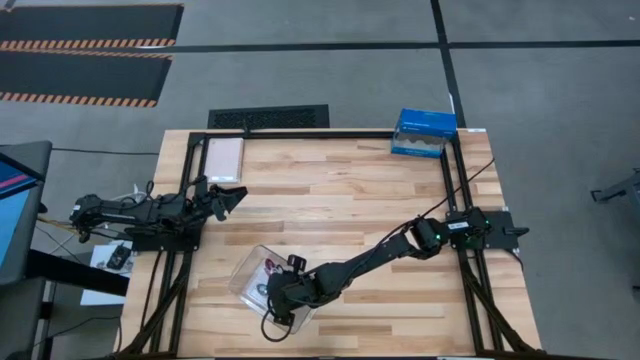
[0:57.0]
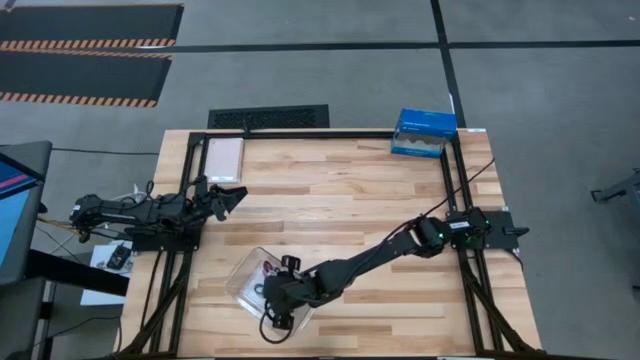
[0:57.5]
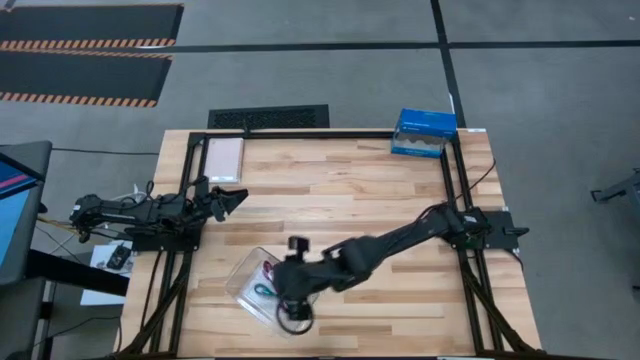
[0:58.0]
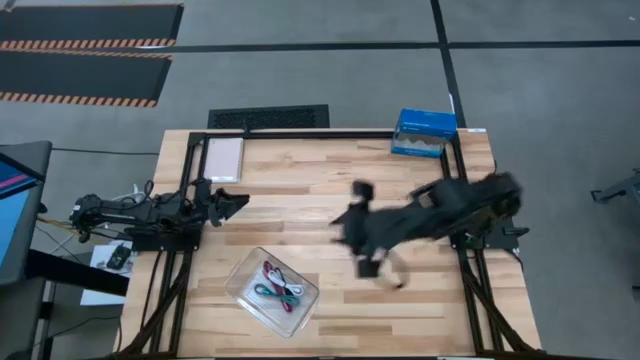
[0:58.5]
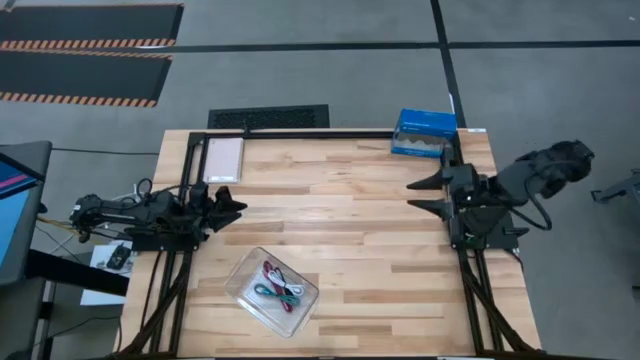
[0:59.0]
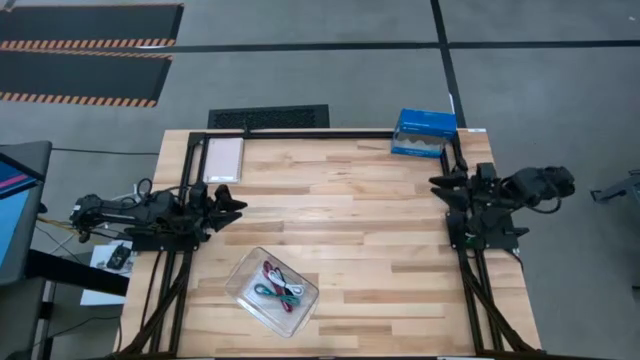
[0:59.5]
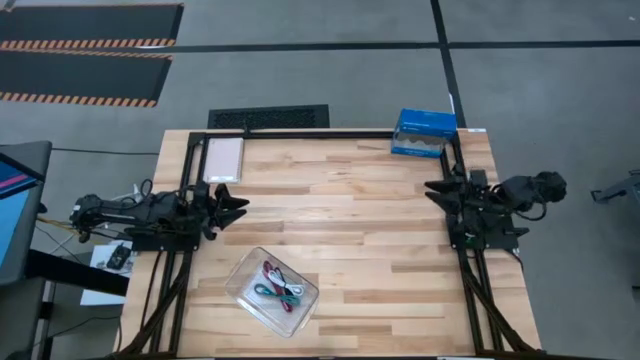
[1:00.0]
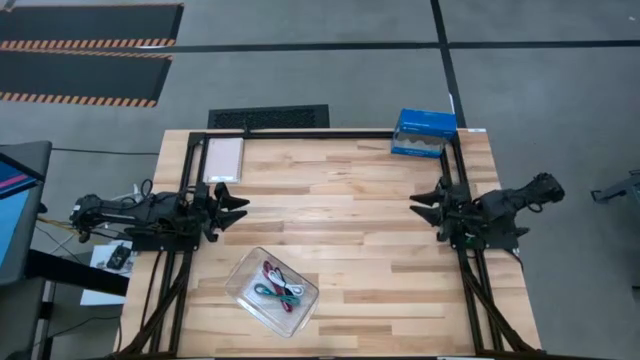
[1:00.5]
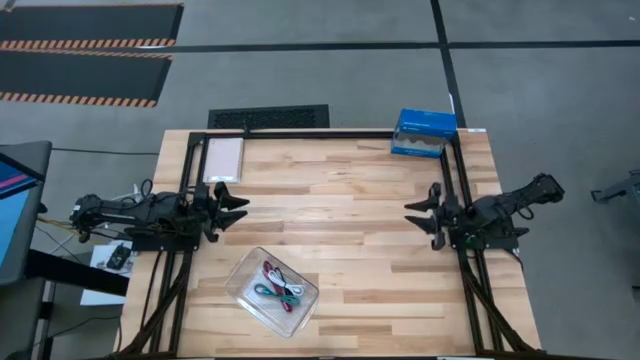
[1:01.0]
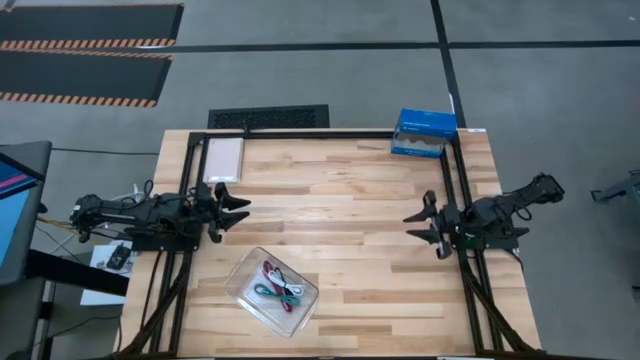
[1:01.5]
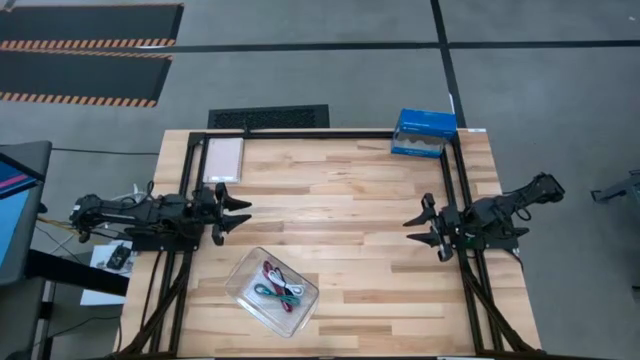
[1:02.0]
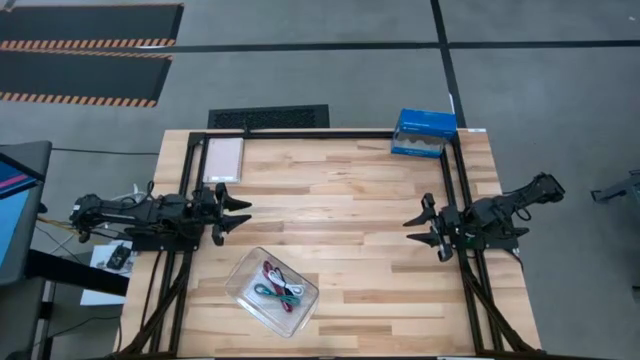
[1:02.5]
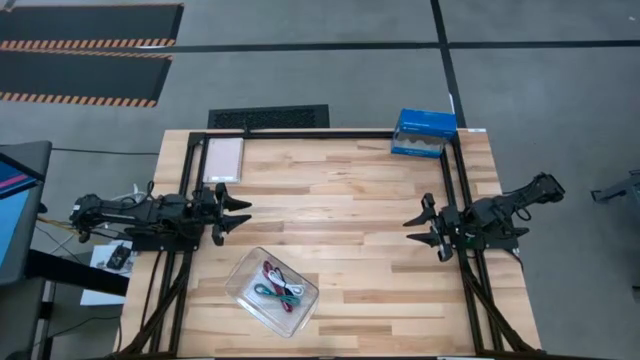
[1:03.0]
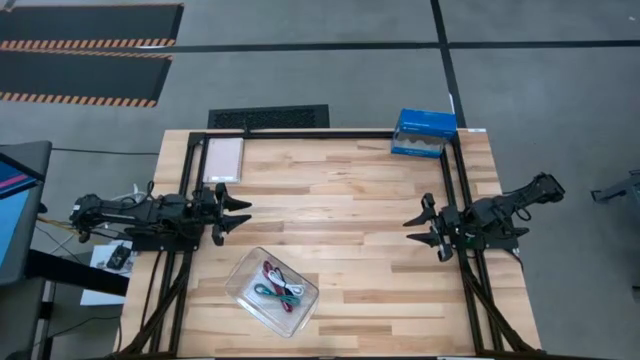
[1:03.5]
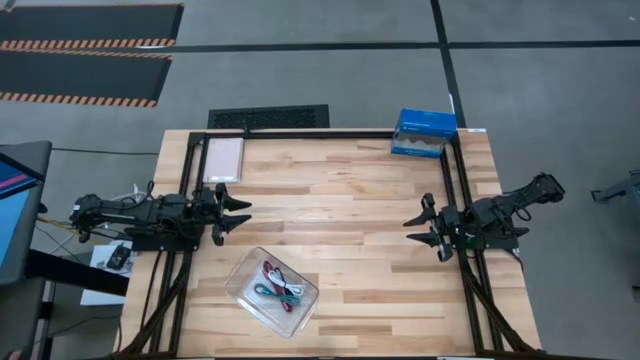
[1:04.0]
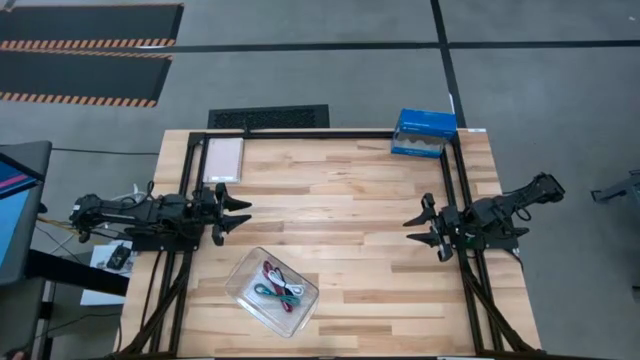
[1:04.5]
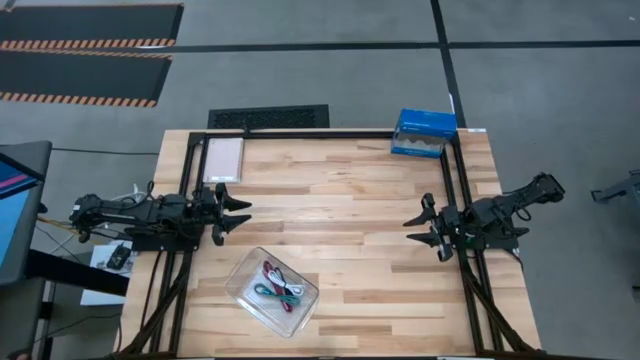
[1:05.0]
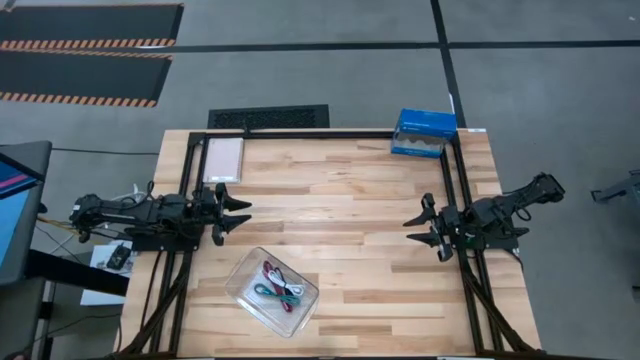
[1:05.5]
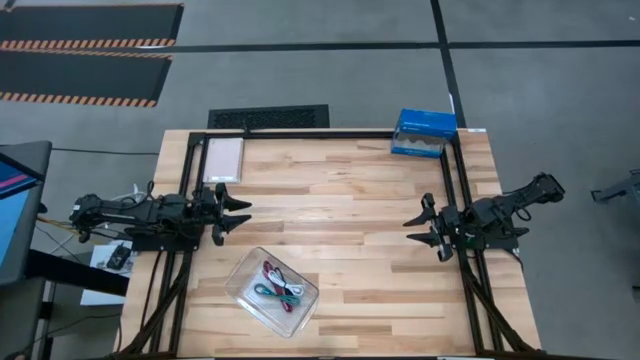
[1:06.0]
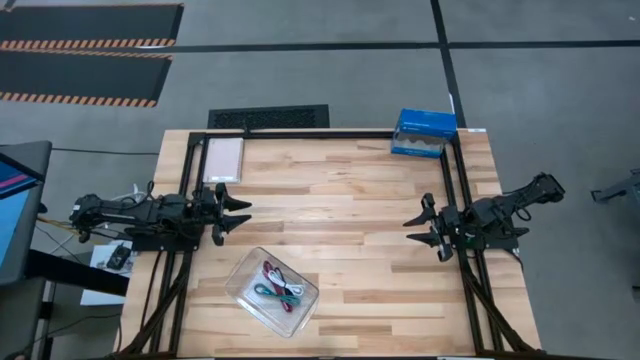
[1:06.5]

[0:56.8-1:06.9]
Task: Pick and place USB-C Cables
Return to Home Position

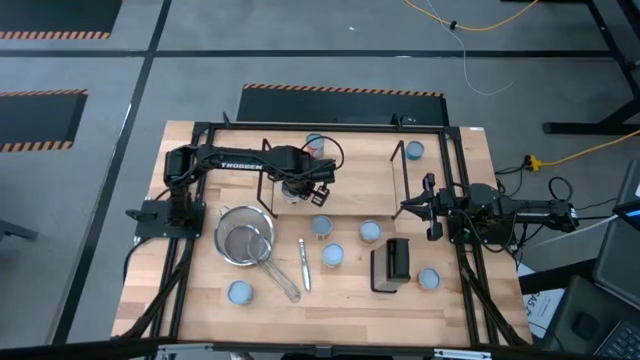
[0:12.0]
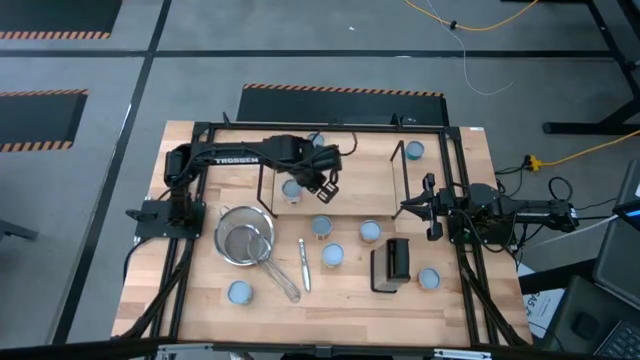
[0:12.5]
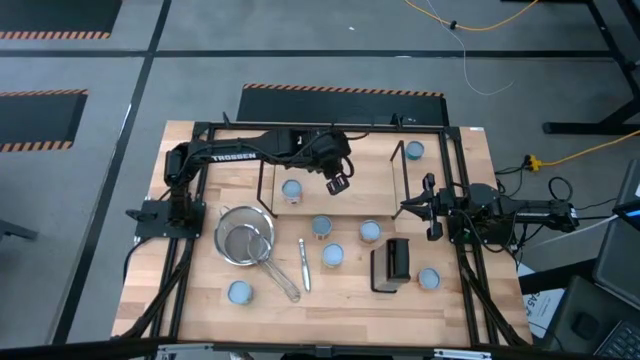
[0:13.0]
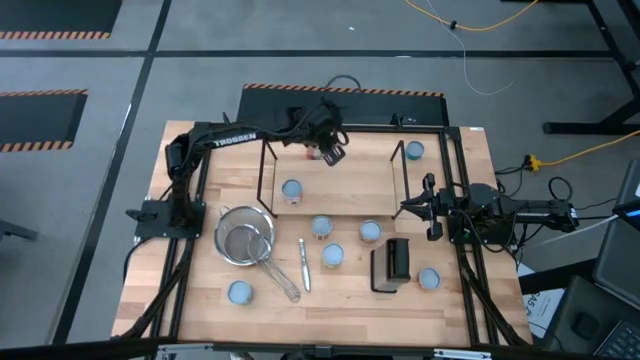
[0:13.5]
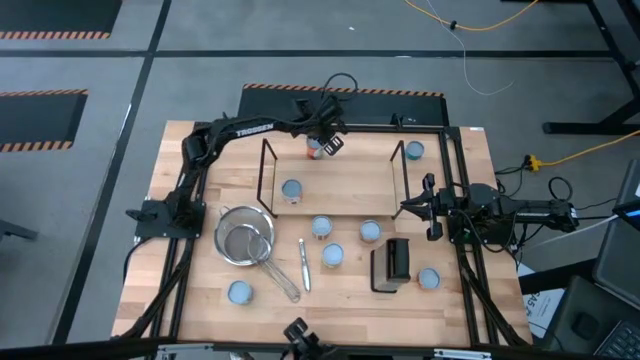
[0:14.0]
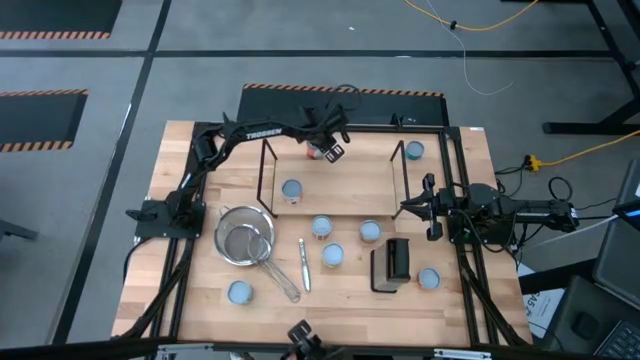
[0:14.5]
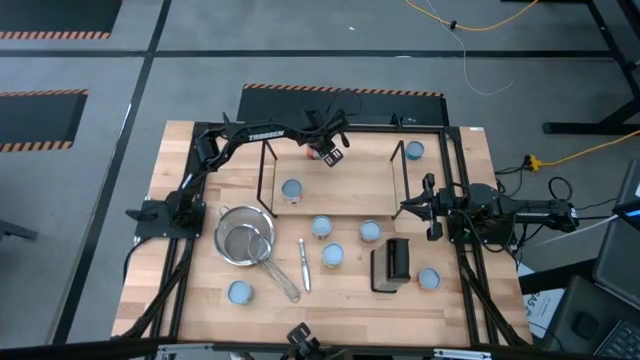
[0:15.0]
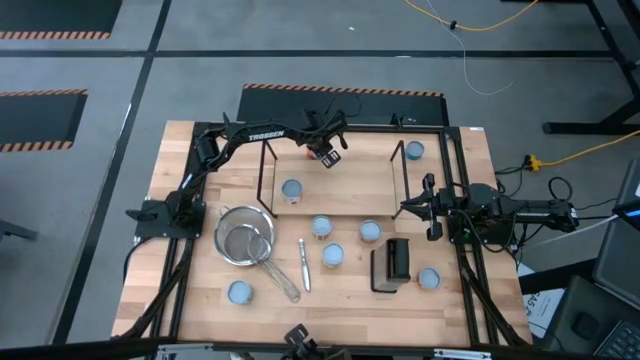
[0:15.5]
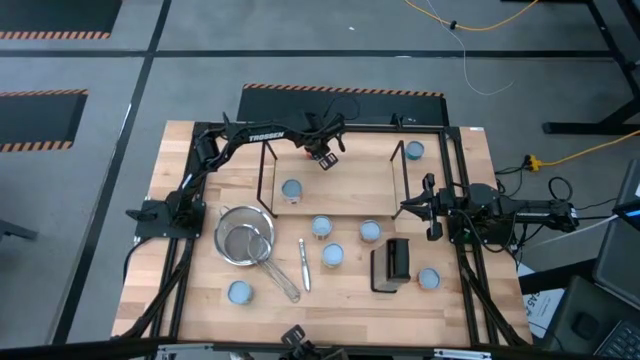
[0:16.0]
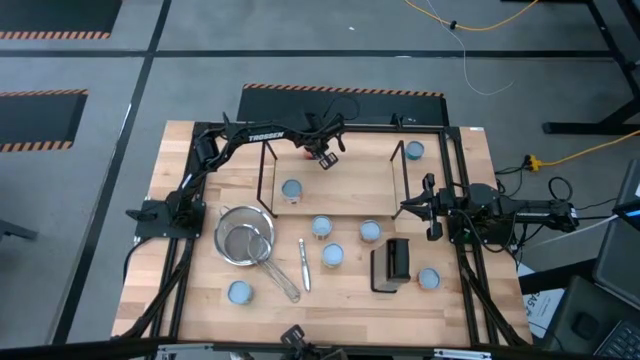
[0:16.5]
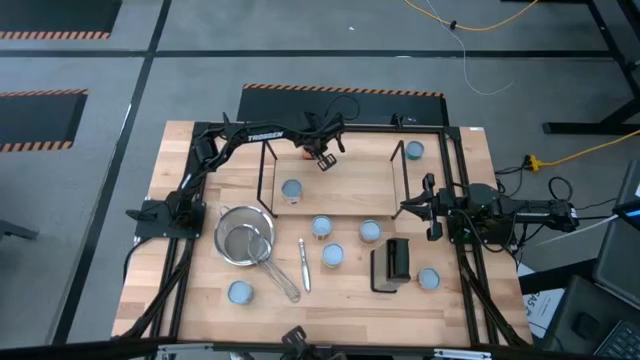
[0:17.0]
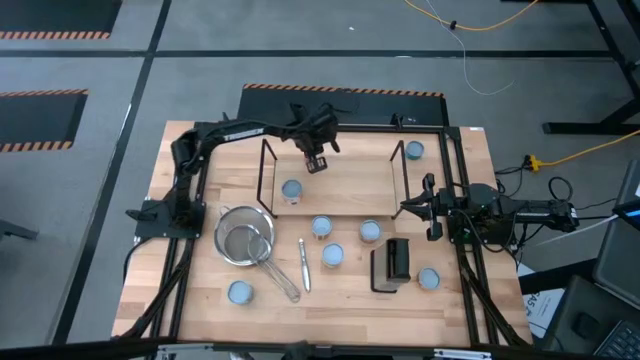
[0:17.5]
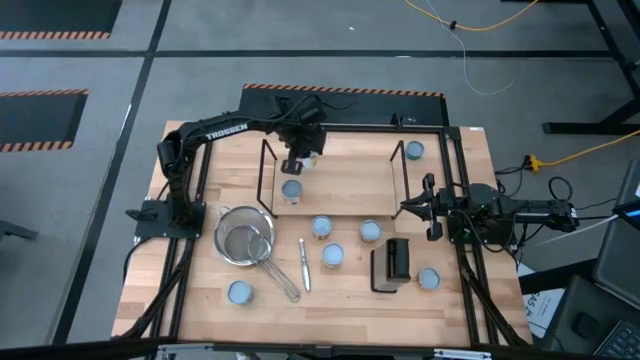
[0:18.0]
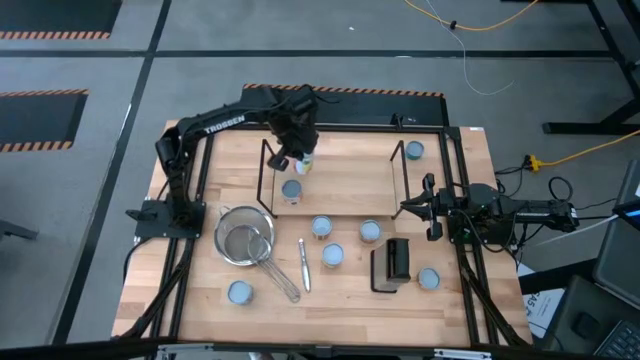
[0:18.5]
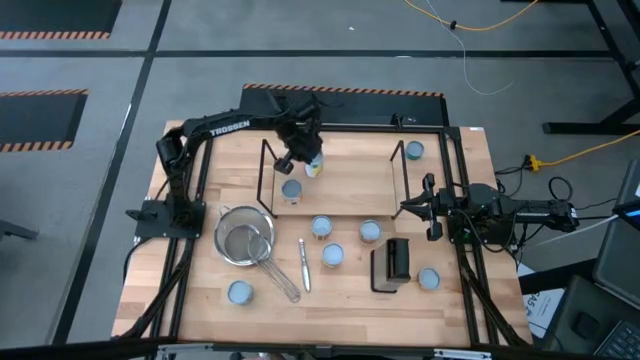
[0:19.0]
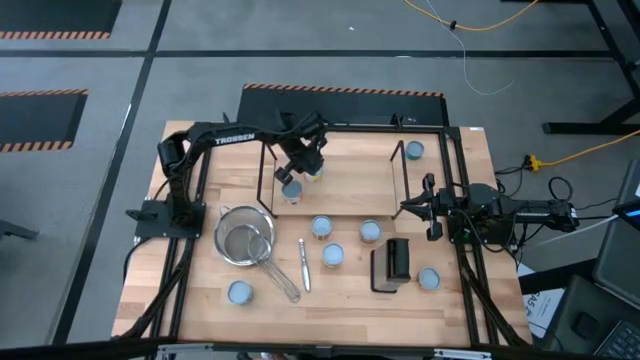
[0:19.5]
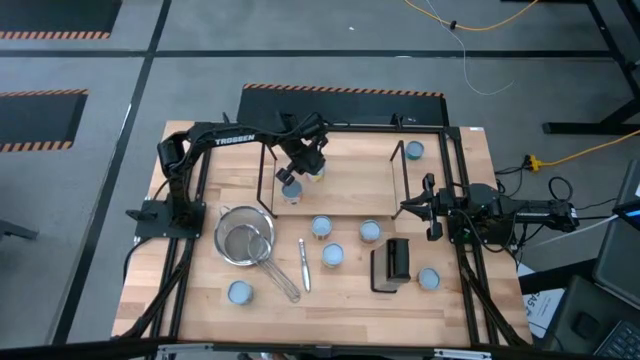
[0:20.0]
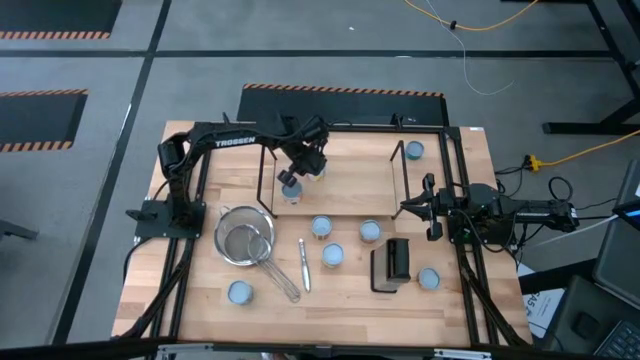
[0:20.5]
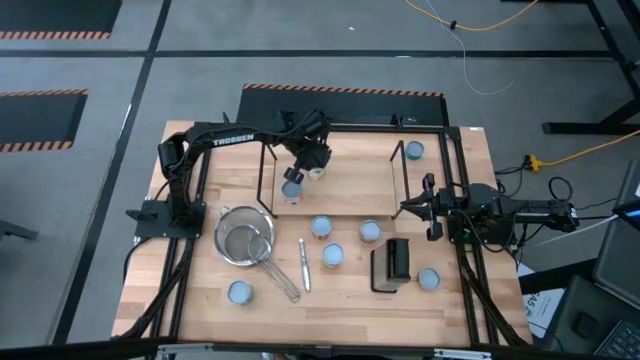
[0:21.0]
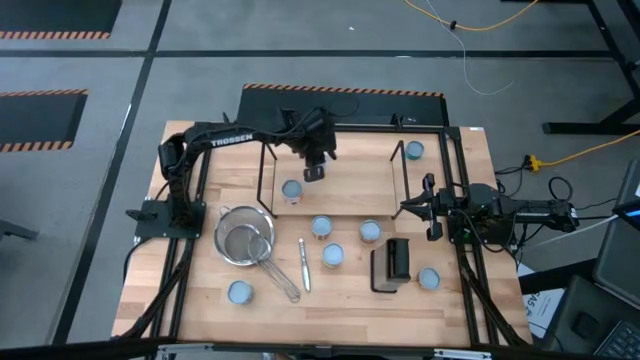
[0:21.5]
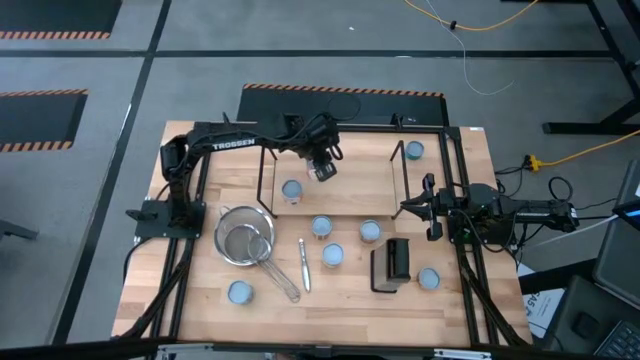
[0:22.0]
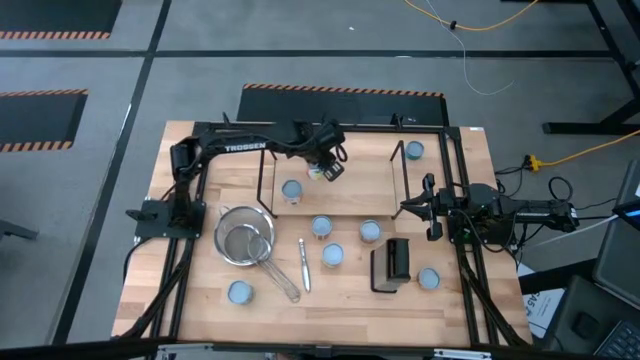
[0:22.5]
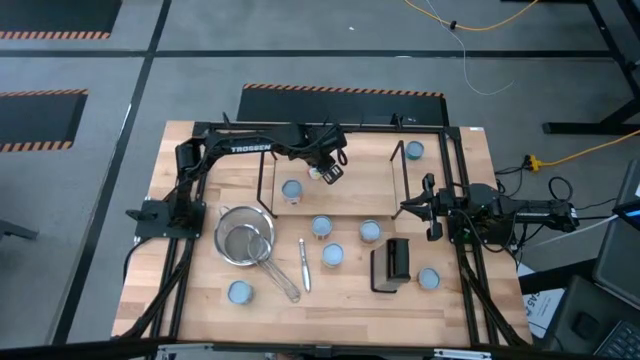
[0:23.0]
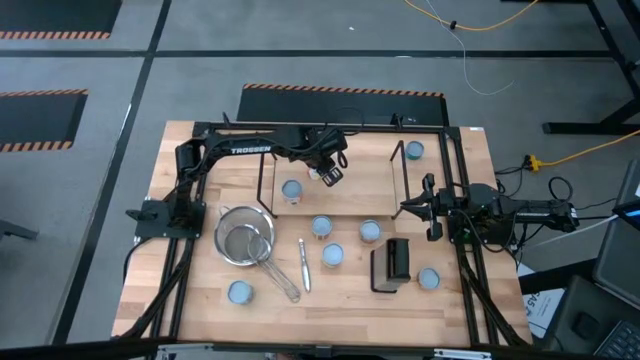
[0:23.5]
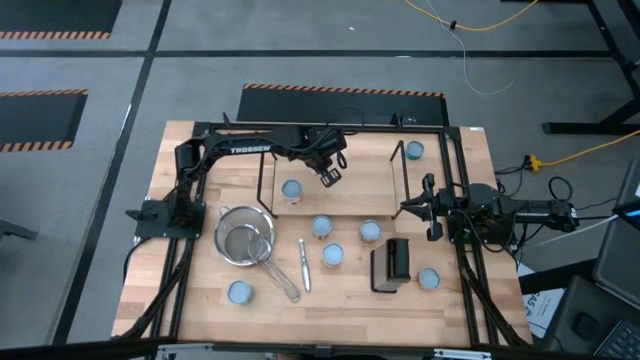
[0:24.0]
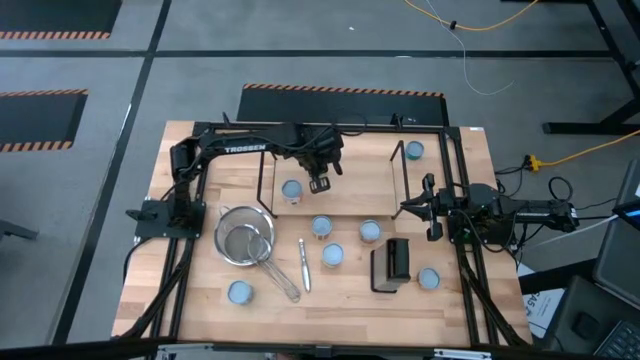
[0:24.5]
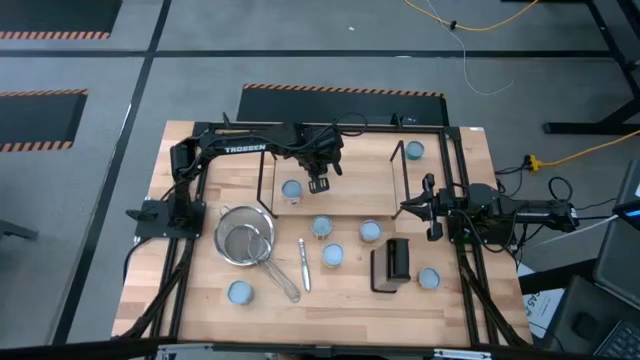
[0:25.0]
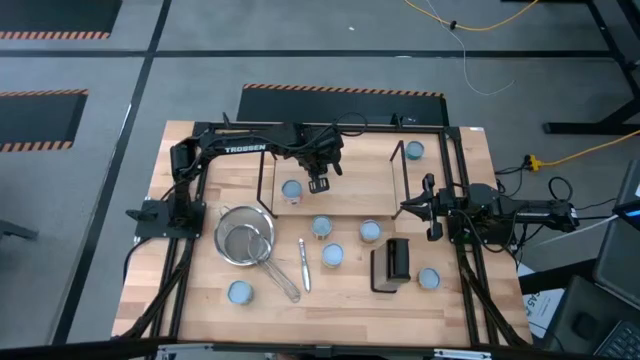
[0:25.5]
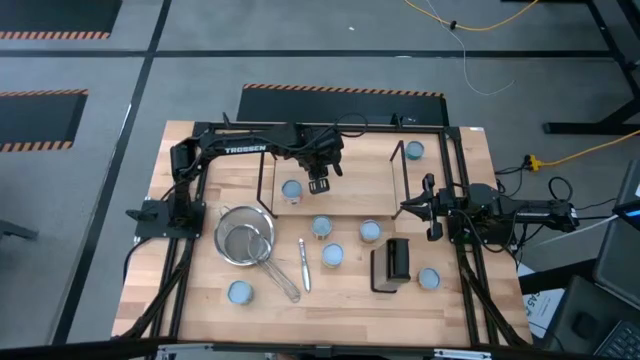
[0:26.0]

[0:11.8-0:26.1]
Task: Pick and place cans onto a shelf
Put the red can on the shelf
